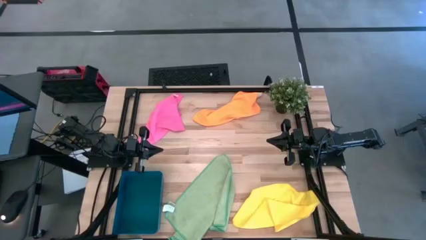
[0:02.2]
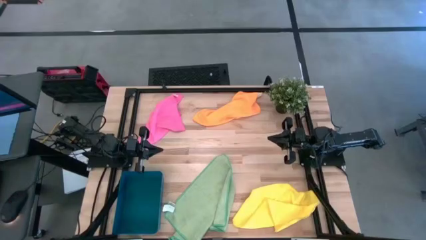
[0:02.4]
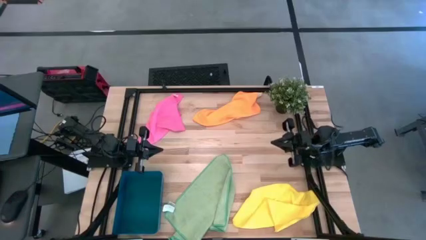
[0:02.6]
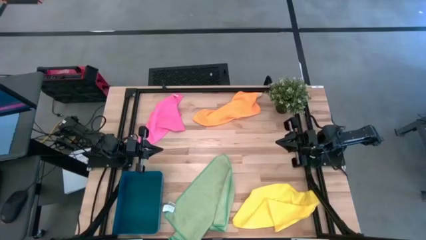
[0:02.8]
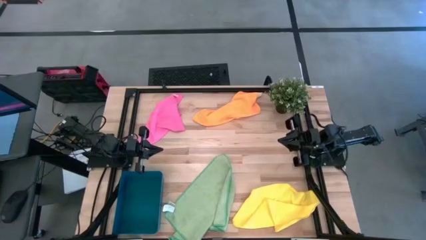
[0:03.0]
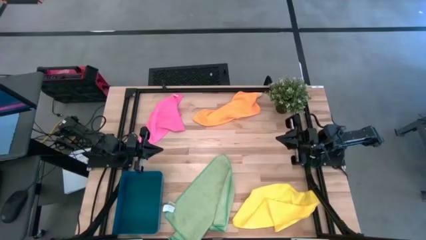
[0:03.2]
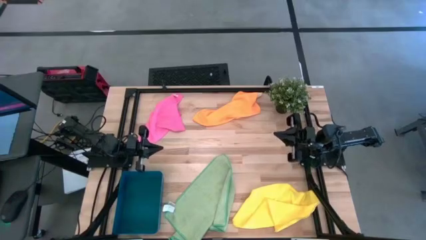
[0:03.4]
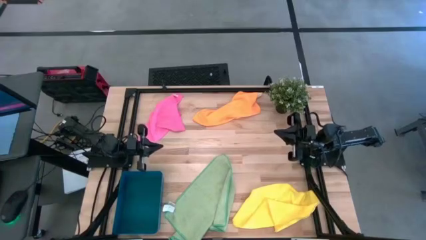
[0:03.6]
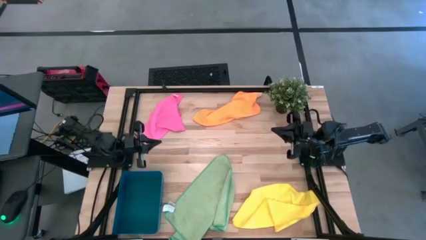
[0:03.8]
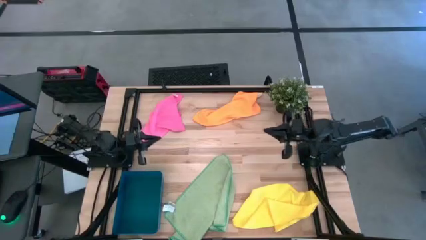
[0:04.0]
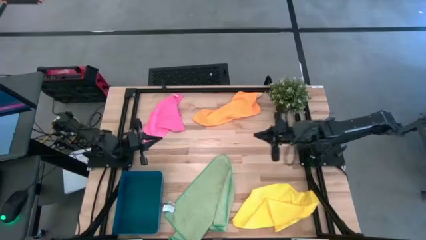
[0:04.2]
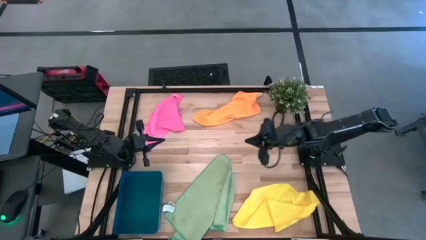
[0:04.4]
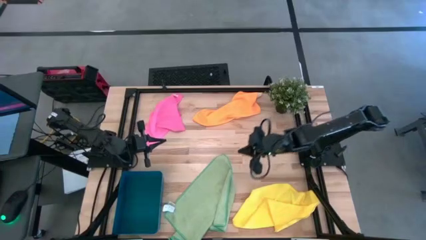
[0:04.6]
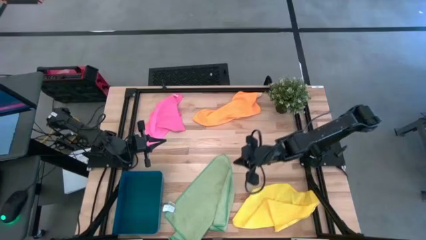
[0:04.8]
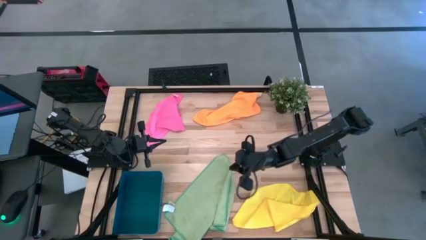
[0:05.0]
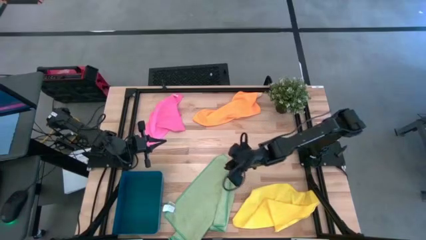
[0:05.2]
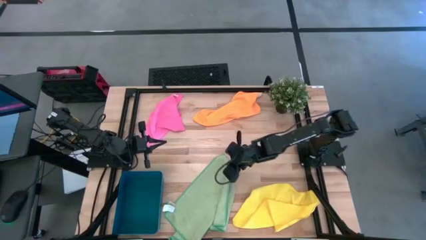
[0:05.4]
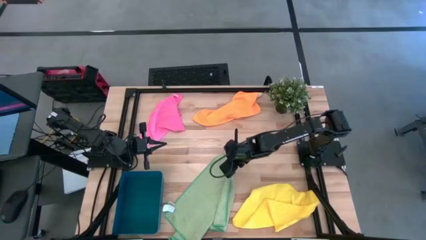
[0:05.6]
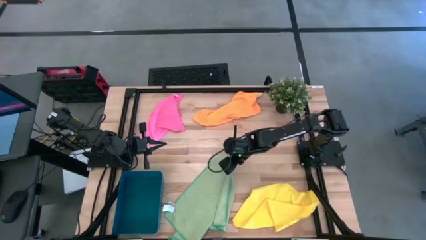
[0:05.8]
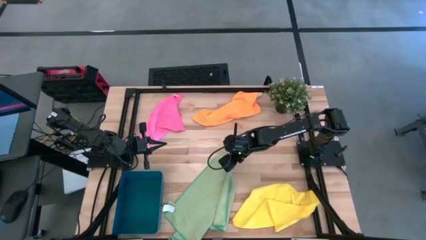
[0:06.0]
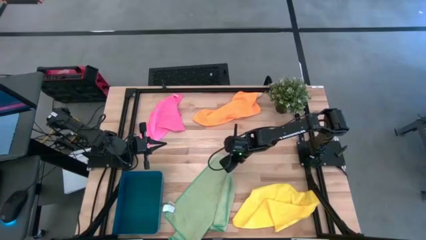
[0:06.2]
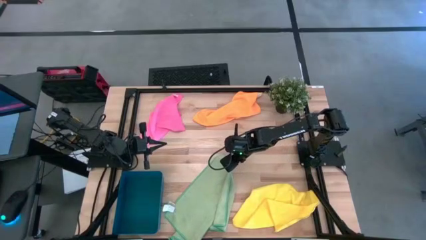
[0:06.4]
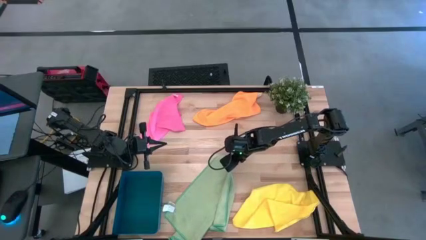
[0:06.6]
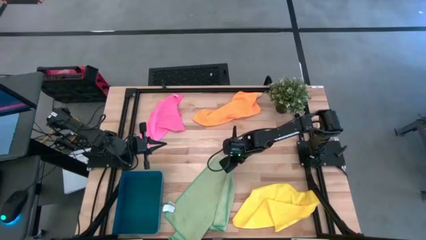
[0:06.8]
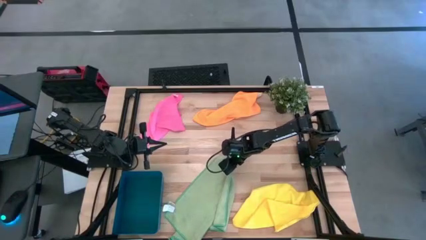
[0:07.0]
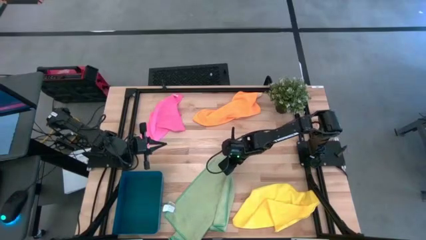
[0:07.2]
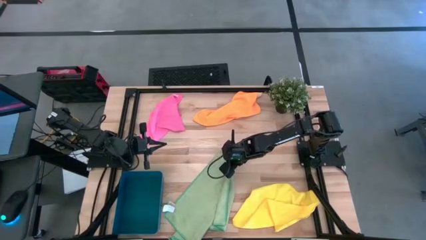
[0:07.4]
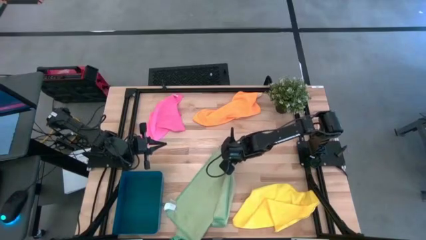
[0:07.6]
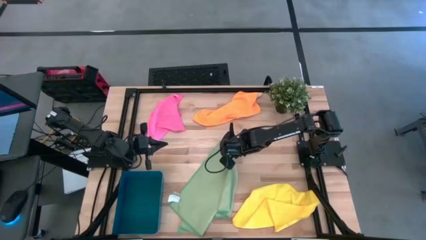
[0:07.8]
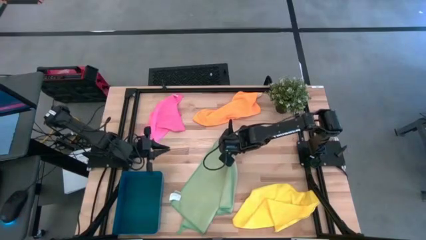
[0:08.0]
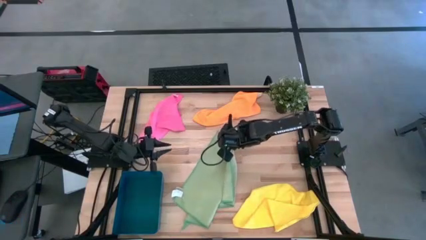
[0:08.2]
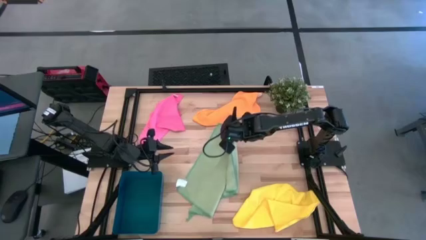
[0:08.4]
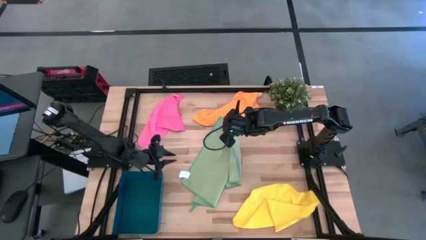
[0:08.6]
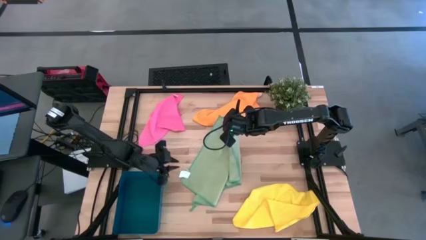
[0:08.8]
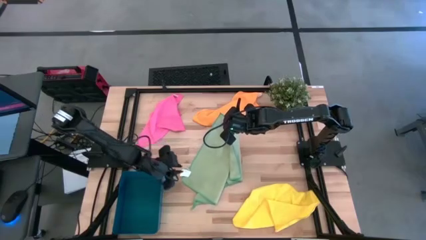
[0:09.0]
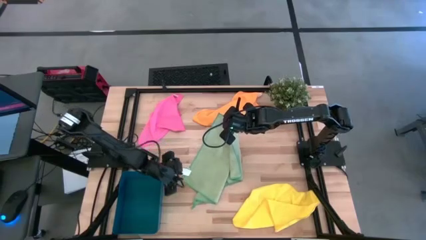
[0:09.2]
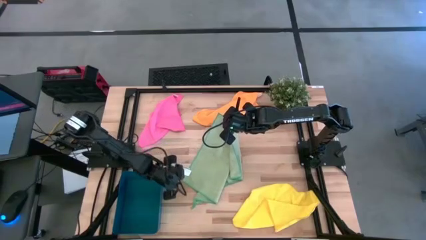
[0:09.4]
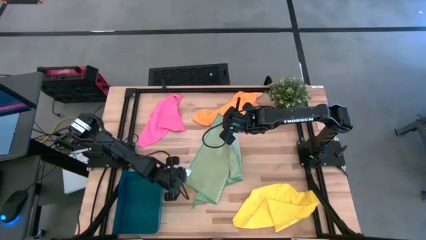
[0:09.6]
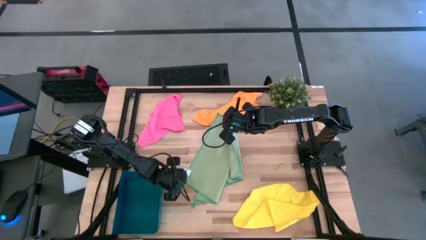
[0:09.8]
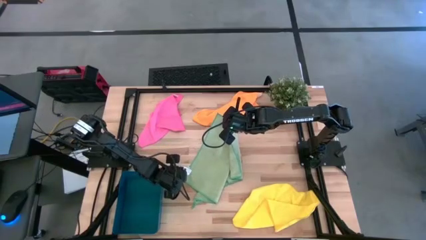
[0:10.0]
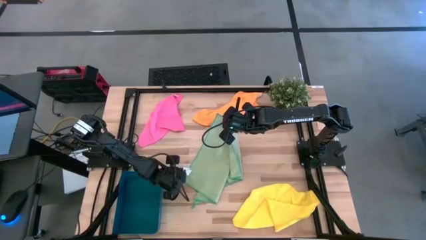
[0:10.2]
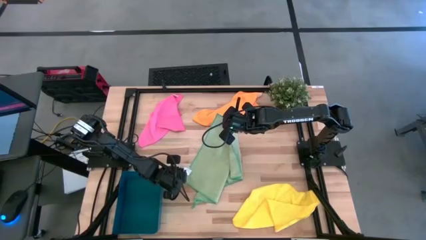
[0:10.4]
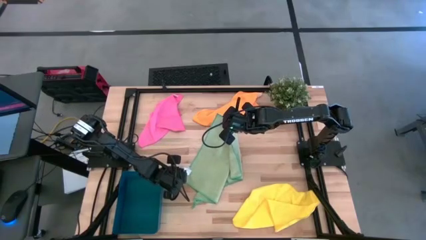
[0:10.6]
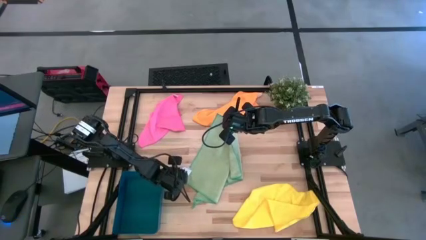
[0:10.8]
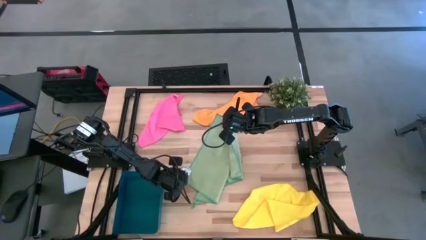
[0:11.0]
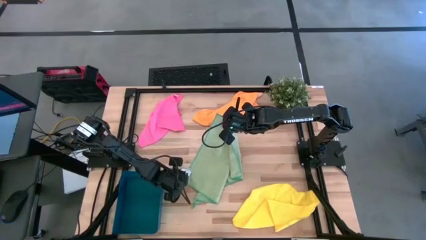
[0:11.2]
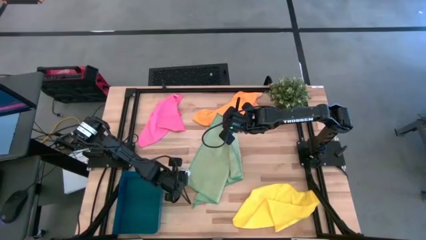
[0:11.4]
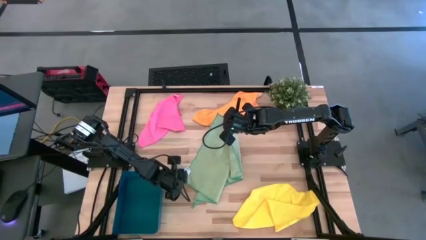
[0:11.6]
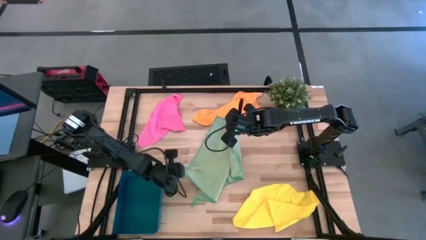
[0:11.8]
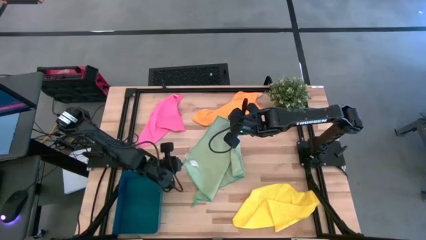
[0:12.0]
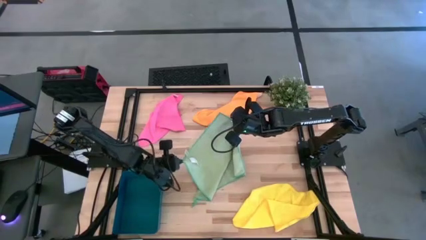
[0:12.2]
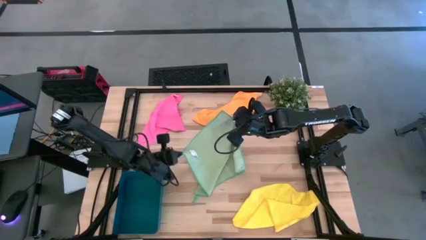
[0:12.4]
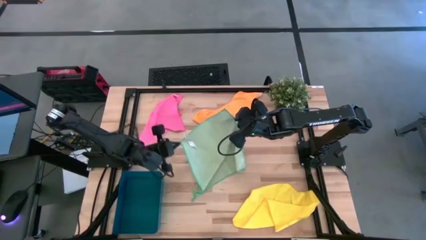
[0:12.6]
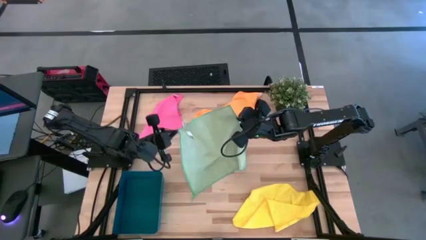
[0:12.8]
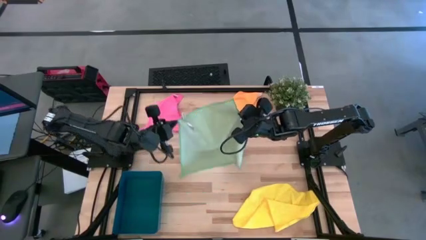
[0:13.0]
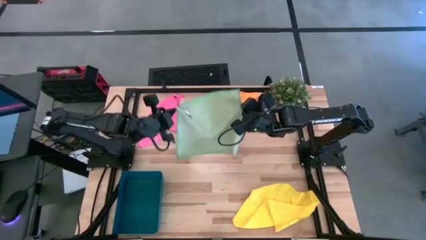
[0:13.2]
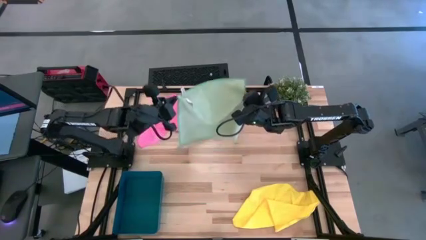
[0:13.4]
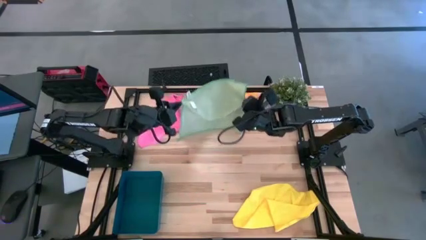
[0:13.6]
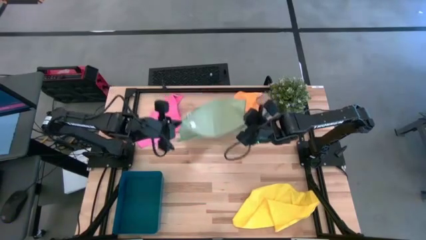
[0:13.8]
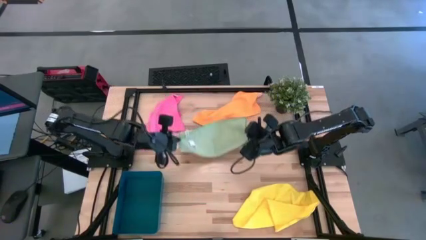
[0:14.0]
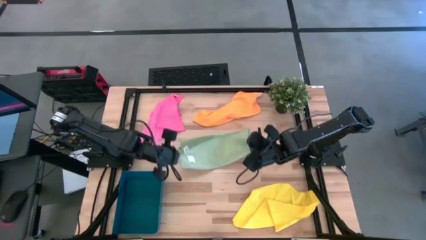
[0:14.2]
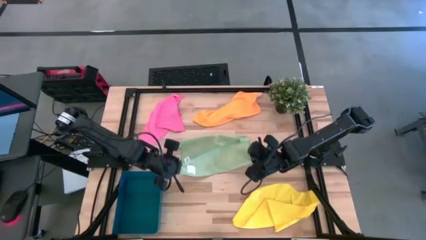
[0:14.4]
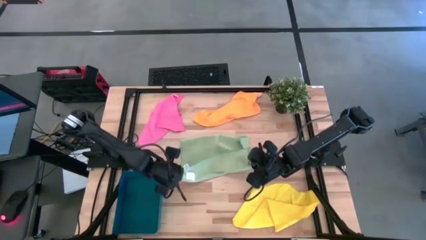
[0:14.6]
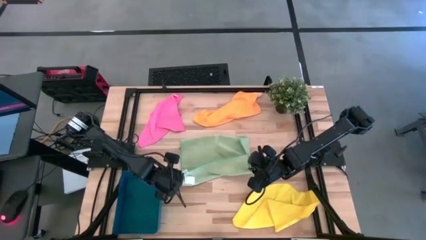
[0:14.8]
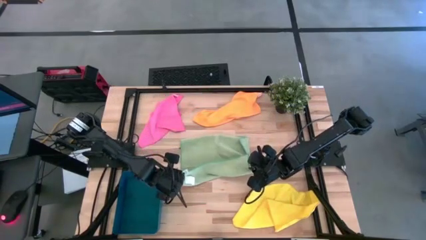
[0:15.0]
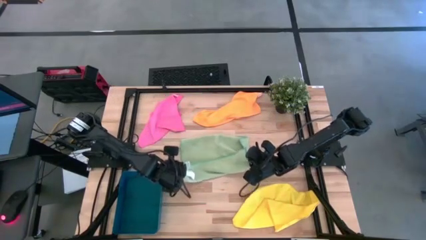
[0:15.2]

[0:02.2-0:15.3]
Task: Fold microfiber towels
Fold the green microfiber towel
